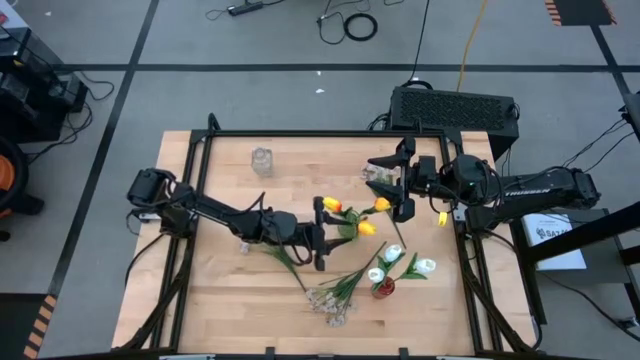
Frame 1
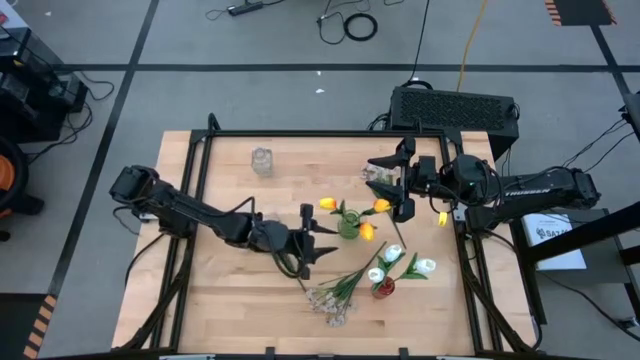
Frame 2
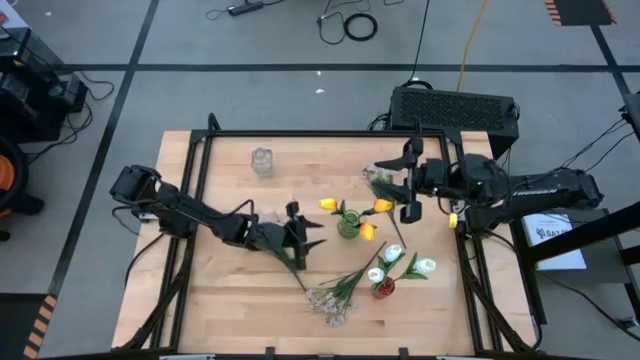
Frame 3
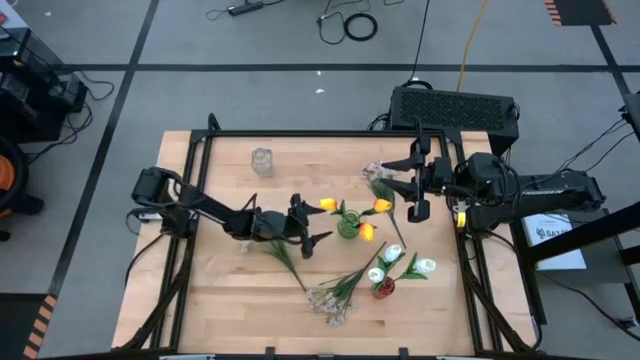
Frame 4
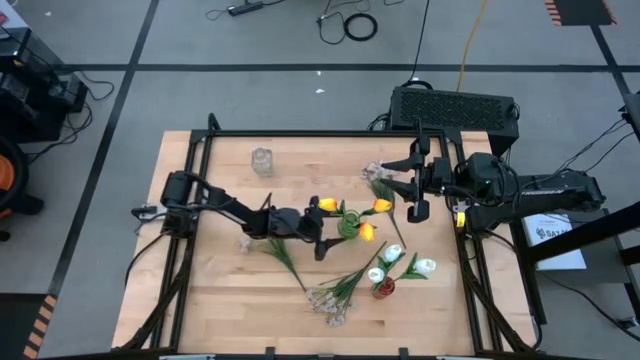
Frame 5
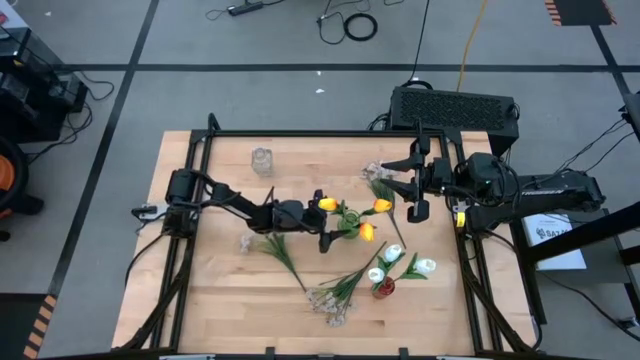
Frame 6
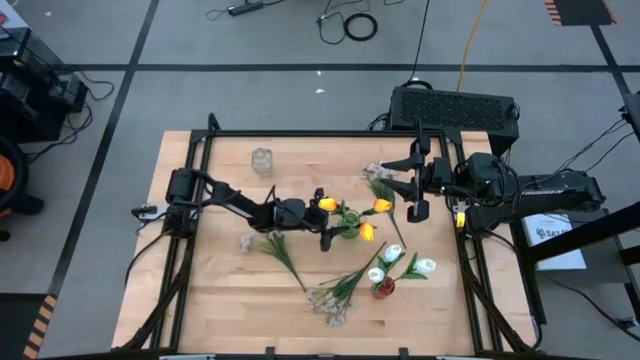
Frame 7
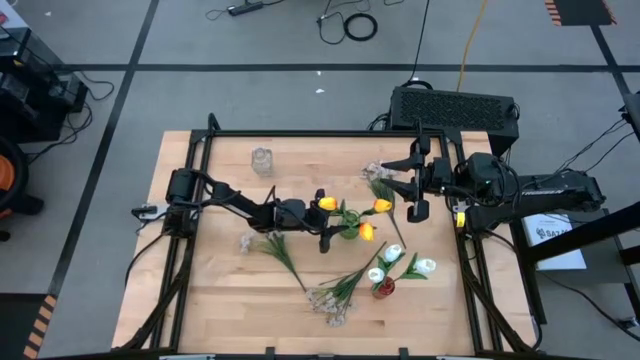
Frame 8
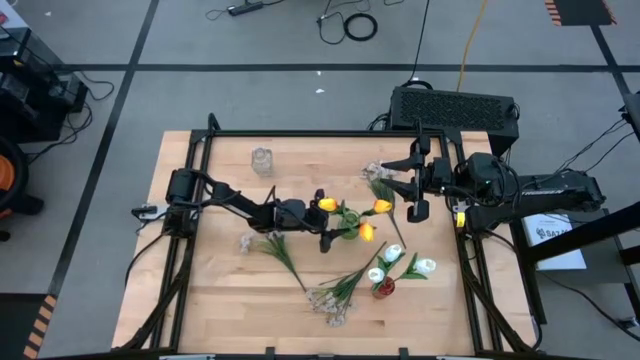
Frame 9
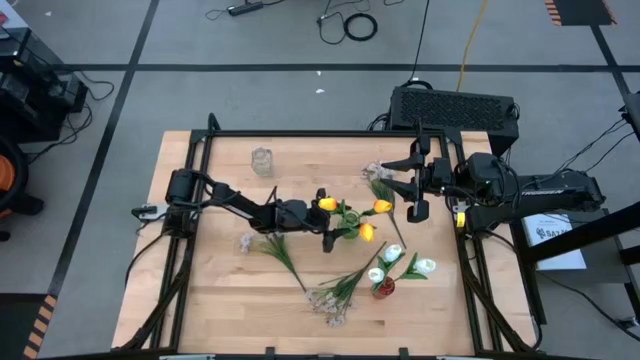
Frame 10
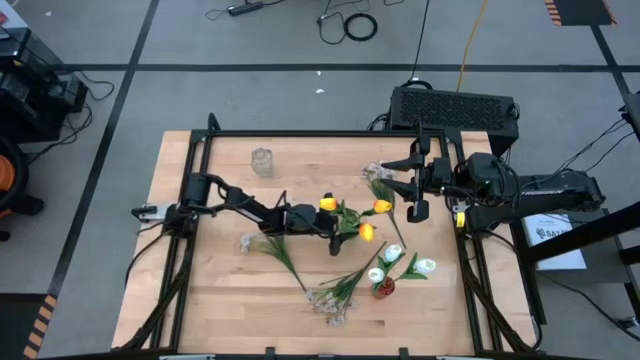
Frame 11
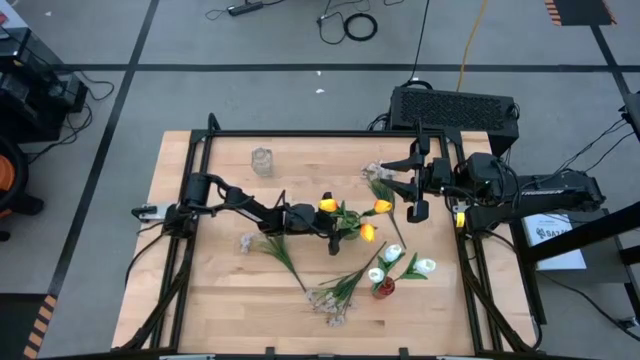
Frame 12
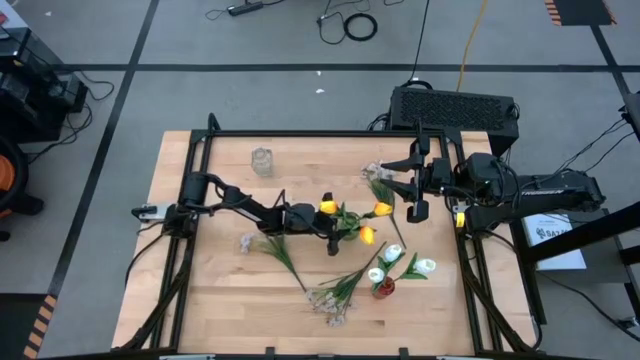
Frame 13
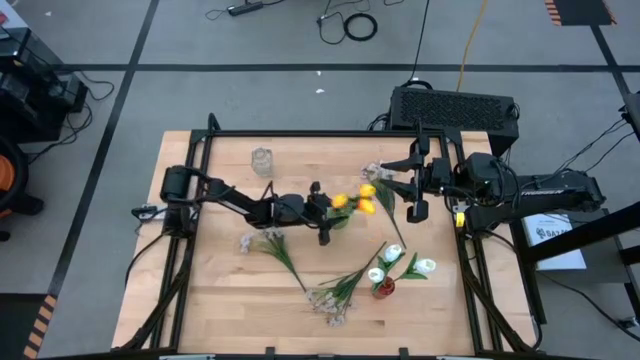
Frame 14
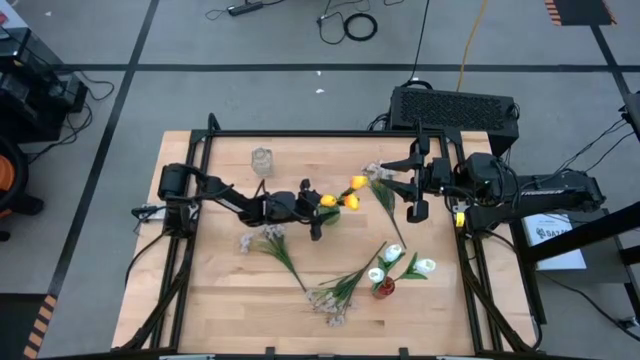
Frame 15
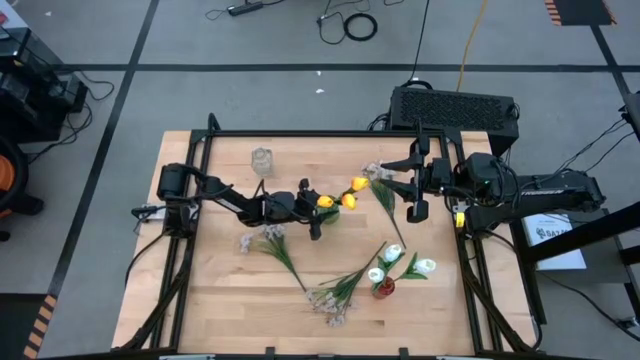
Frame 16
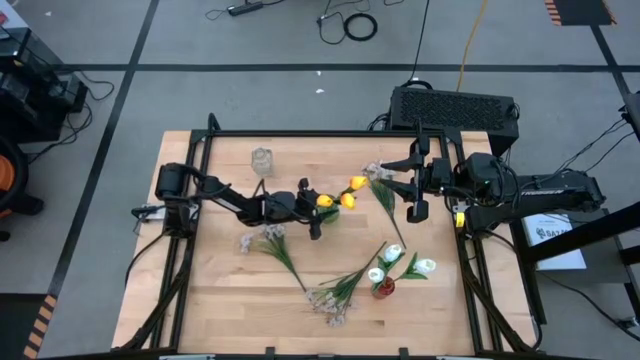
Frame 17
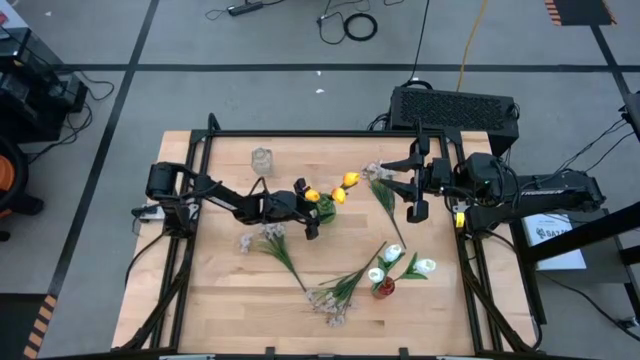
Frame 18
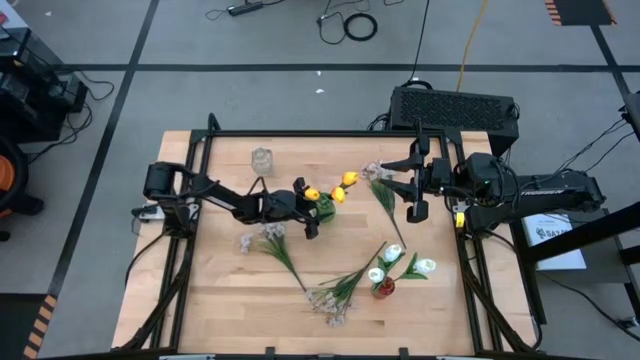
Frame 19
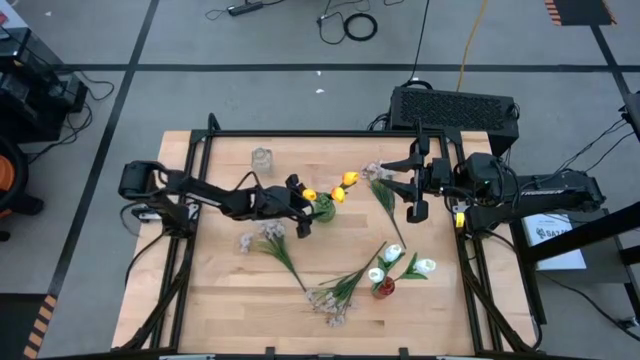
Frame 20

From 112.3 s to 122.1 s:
Task: Sort flowers into vase by color
Adjust the green vase

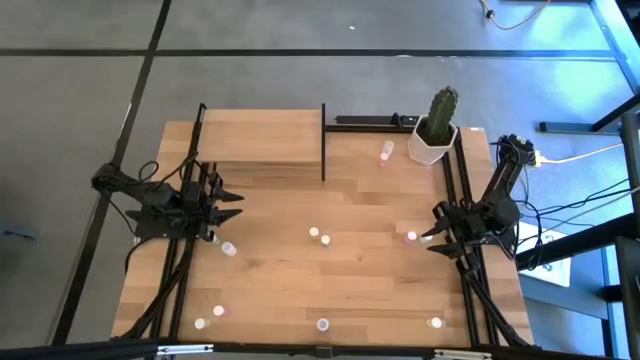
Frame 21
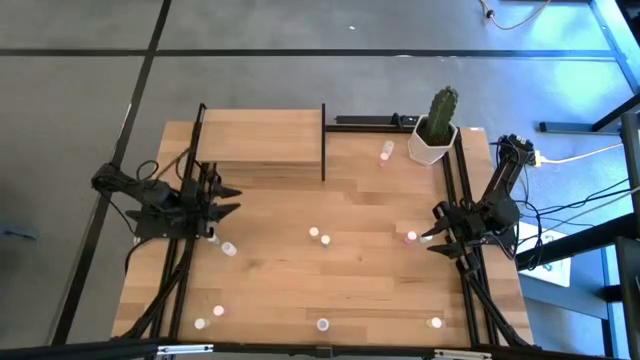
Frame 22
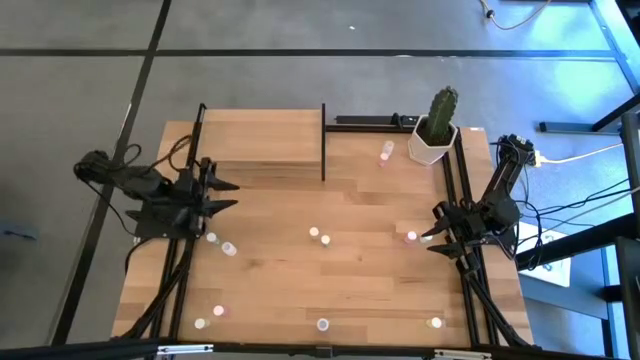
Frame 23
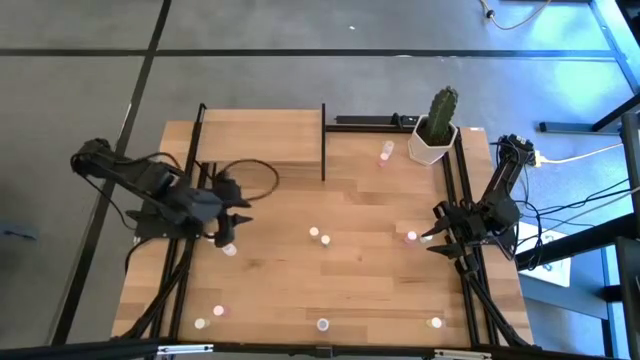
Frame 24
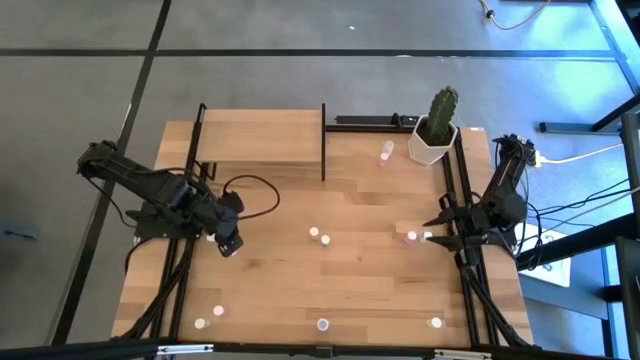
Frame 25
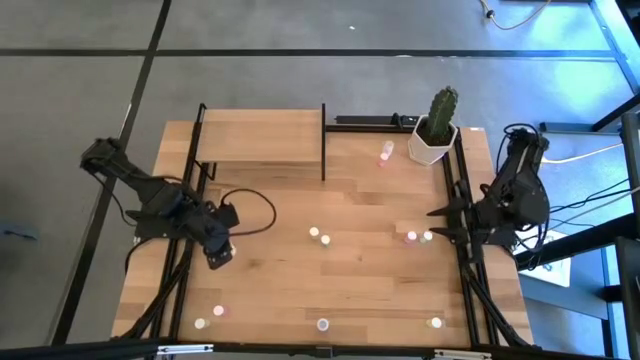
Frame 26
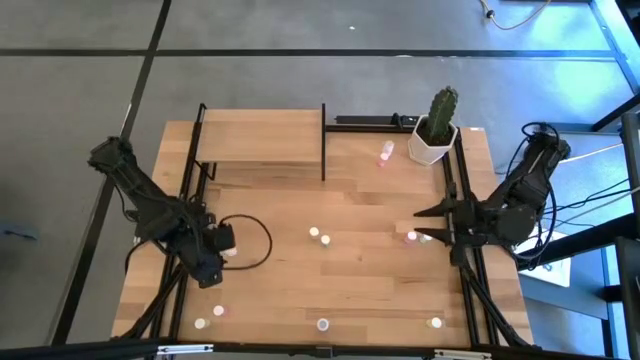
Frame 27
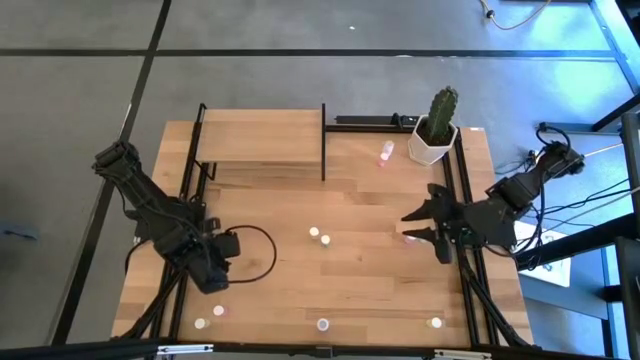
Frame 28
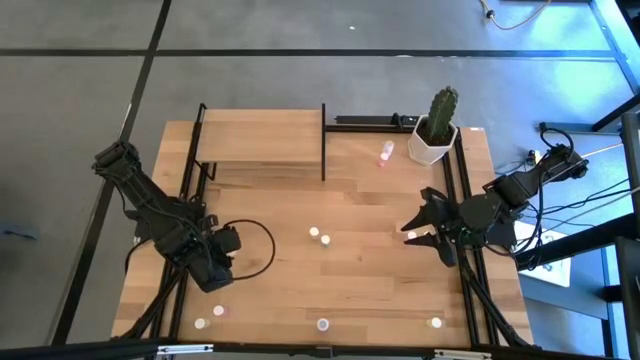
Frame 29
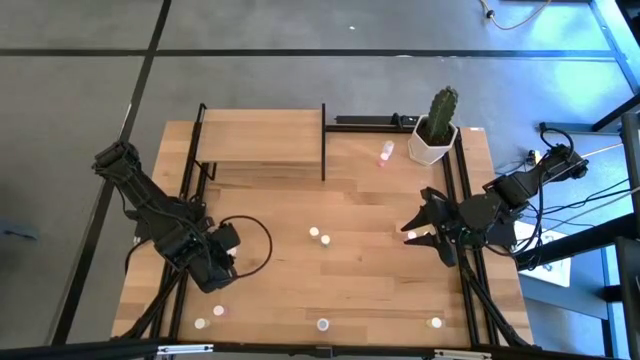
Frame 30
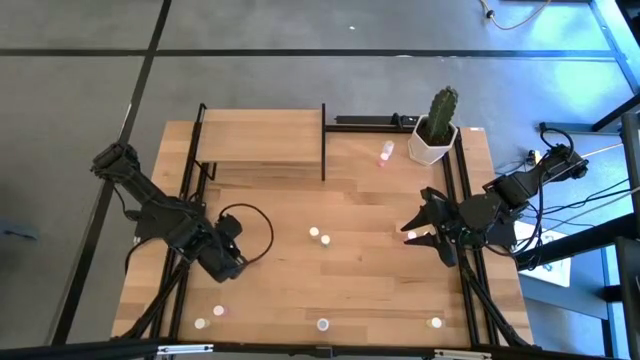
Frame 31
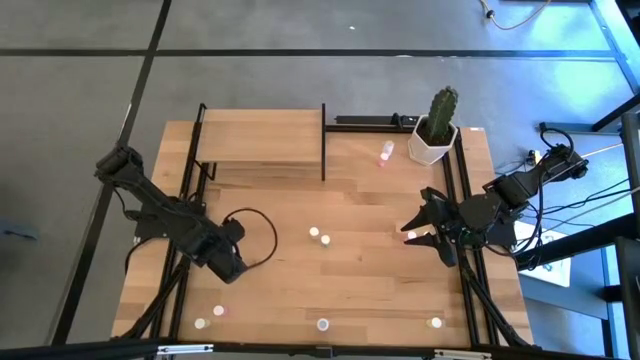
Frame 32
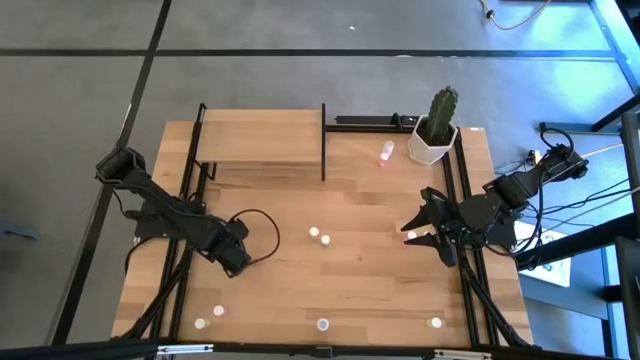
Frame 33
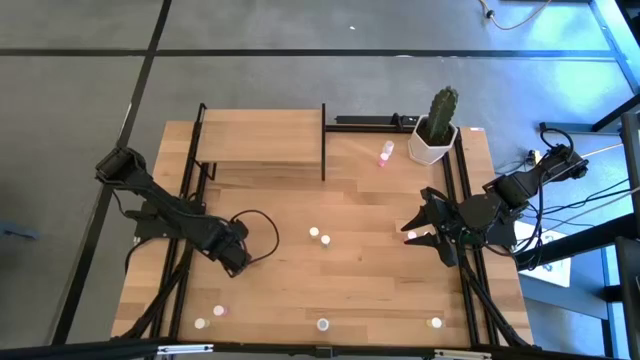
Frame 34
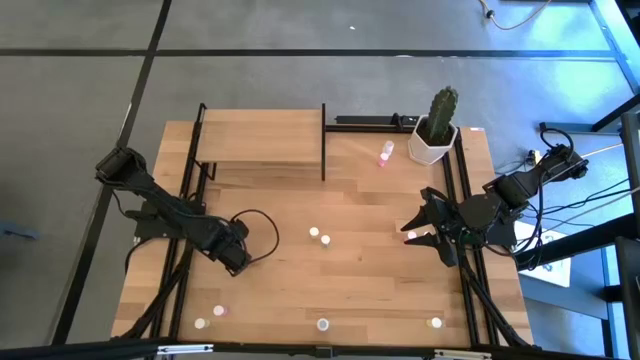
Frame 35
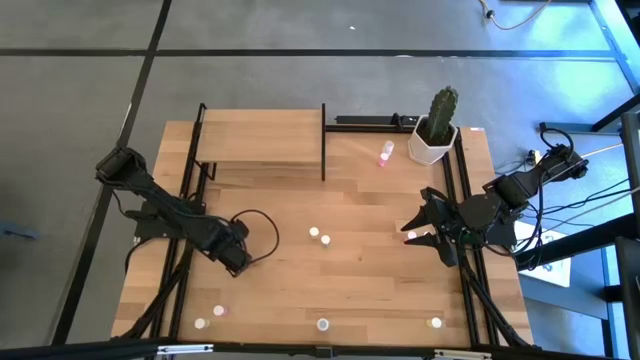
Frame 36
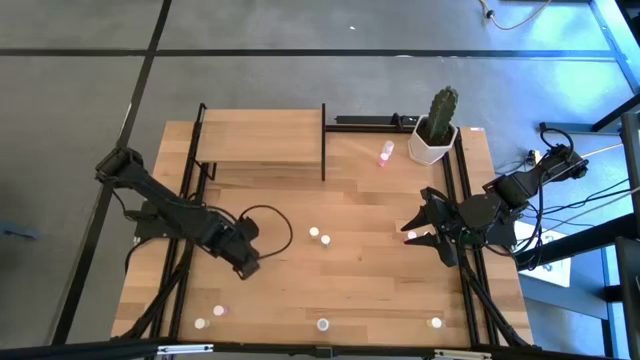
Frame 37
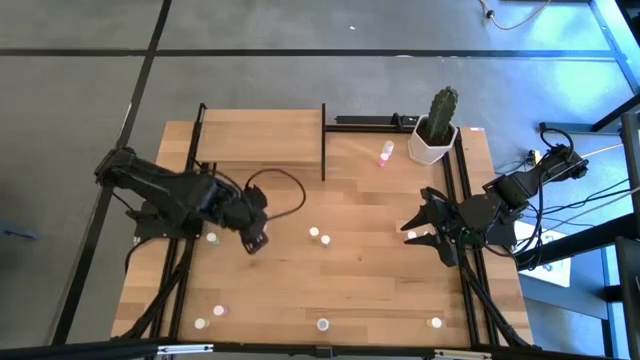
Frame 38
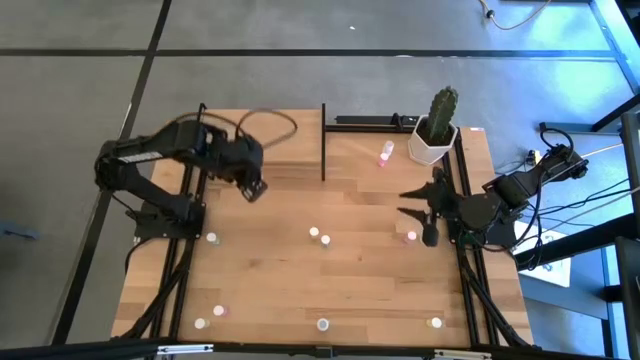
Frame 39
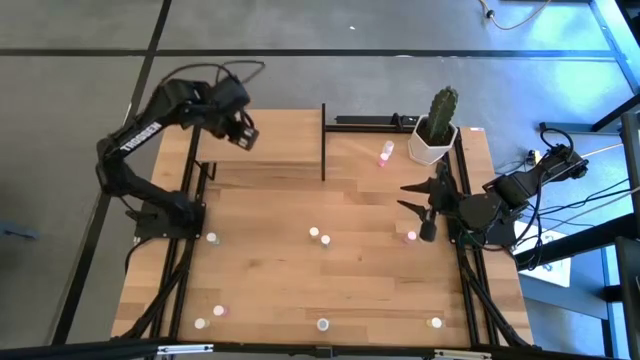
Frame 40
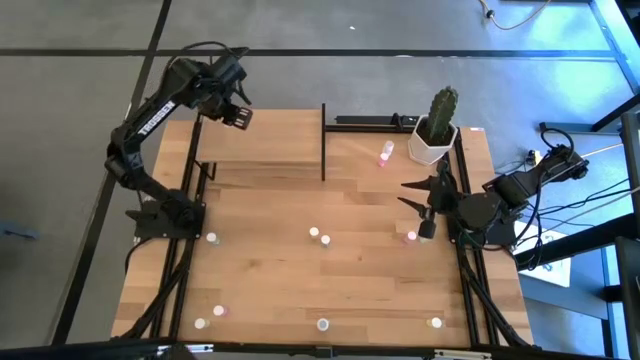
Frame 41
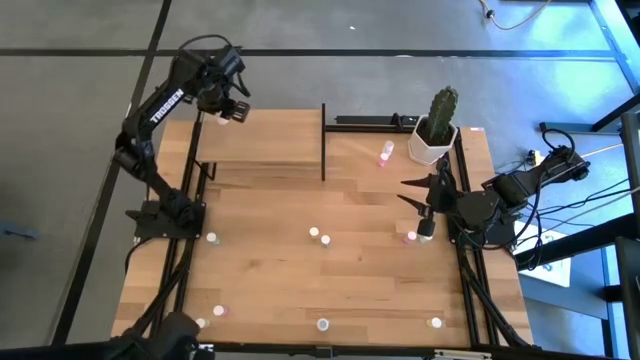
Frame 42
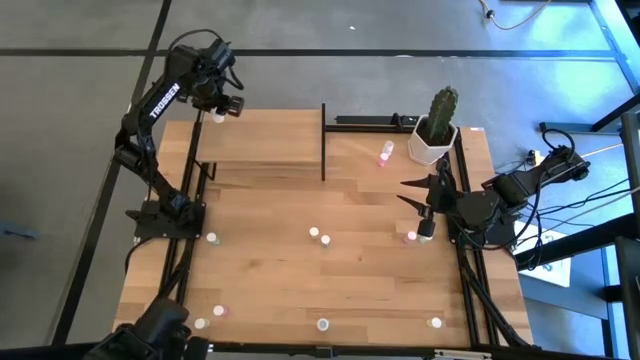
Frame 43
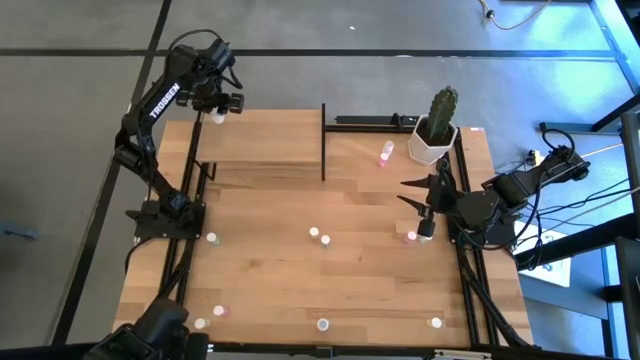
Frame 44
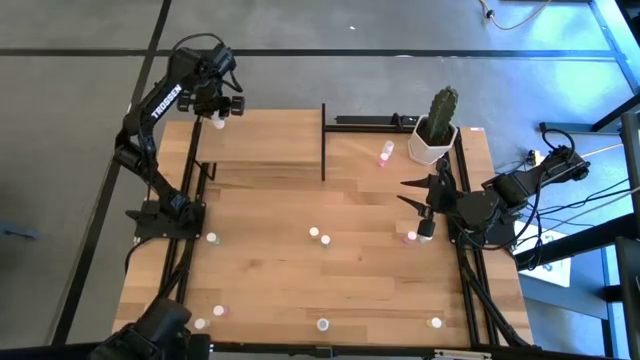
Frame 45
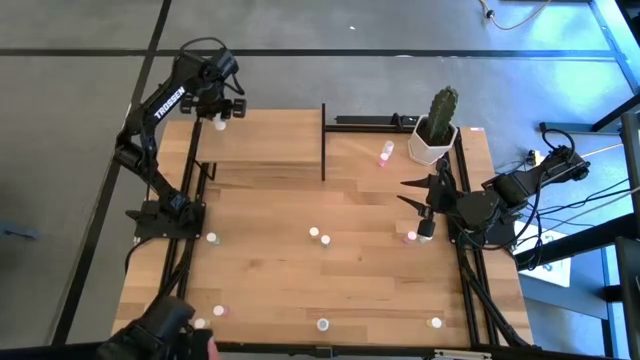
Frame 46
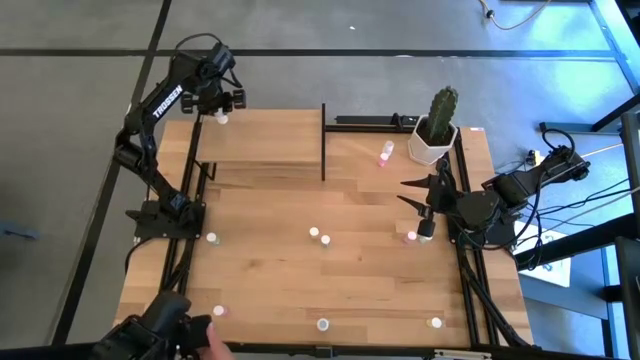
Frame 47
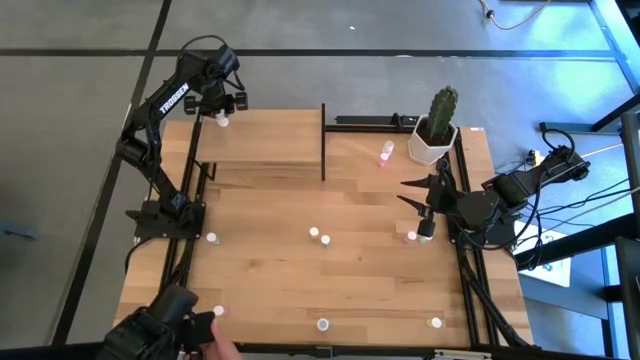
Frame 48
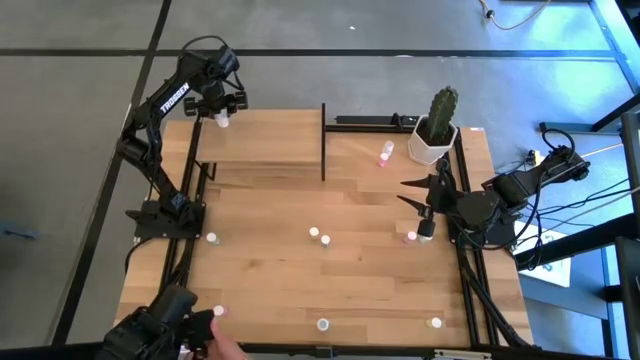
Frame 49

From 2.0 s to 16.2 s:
Task: Pick and place medicine bottles onto shelf by color
Put the middle white pill bottle on the shelf
